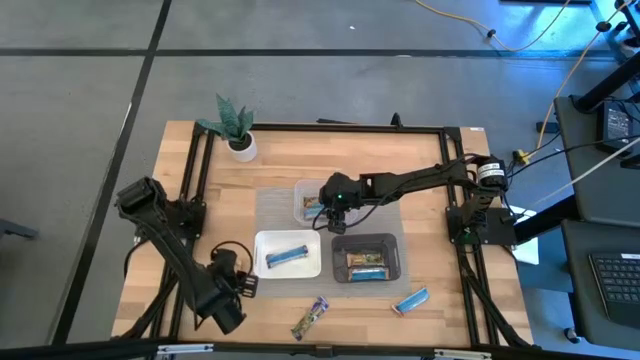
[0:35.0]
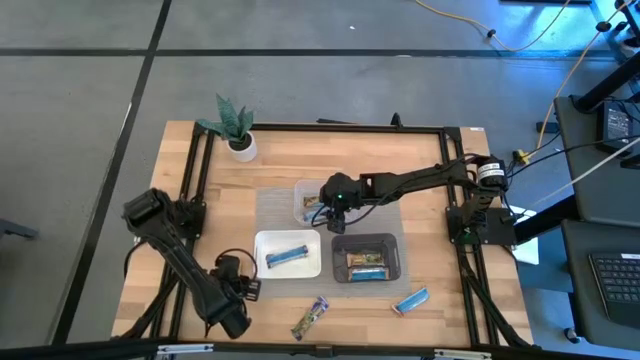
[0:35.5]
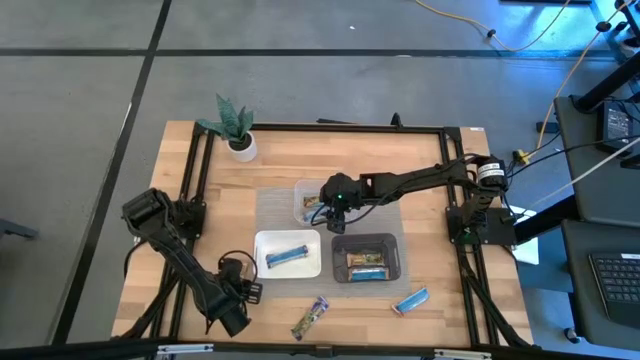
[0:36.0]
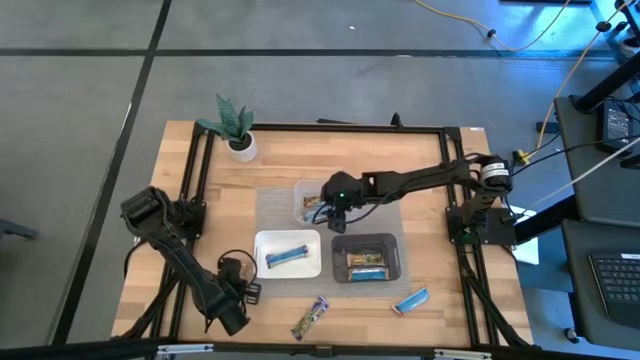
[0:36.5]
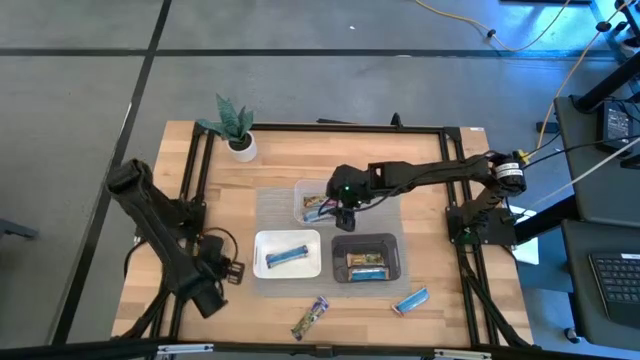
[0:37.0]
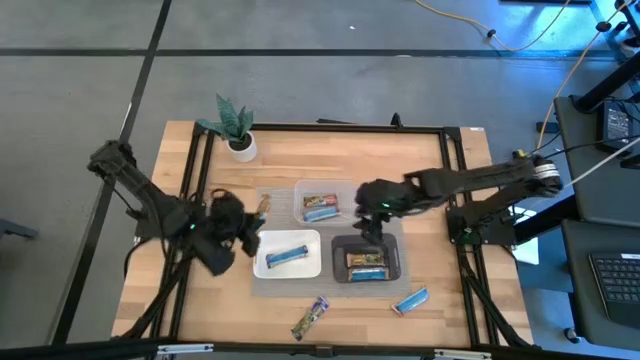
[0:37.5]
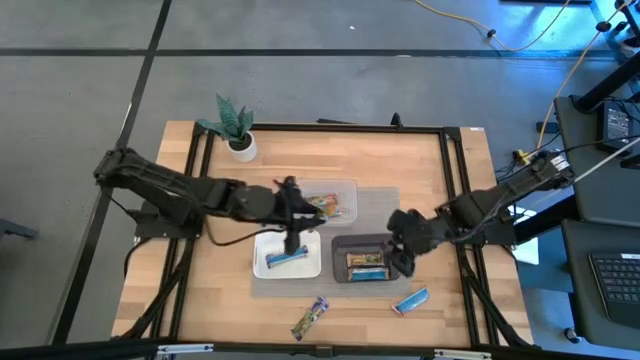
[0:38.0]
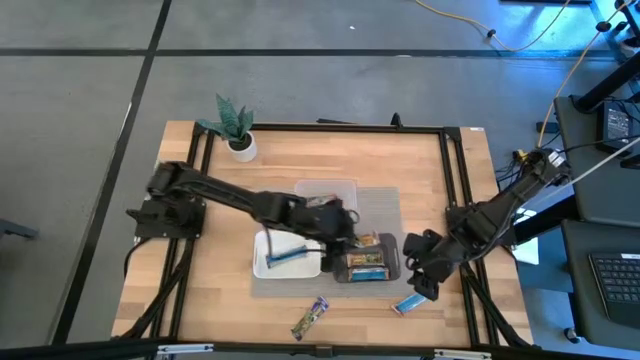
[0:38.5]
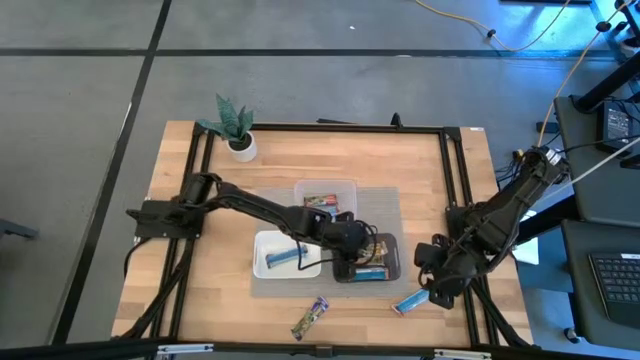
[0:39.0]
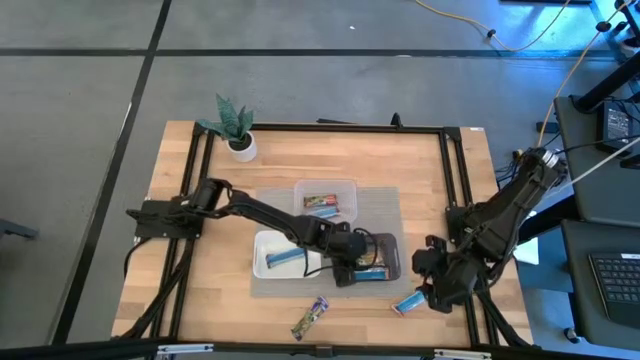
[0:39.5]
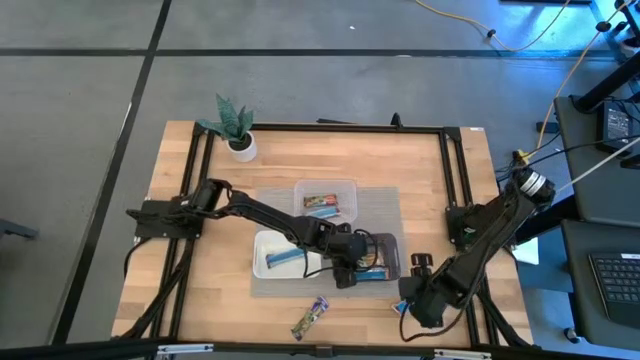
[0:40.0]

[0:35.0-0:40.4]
Task: Pick and place Granola Bars by type
Put the yellow granola bar into the transparent black bin

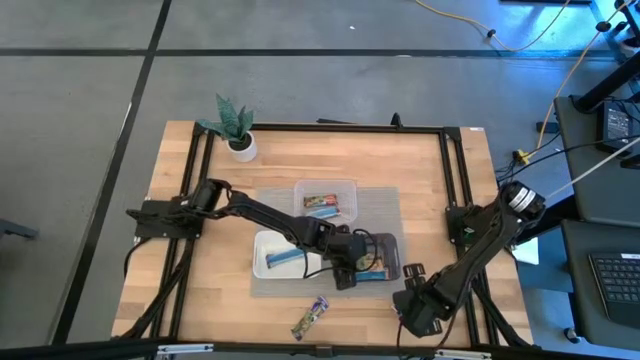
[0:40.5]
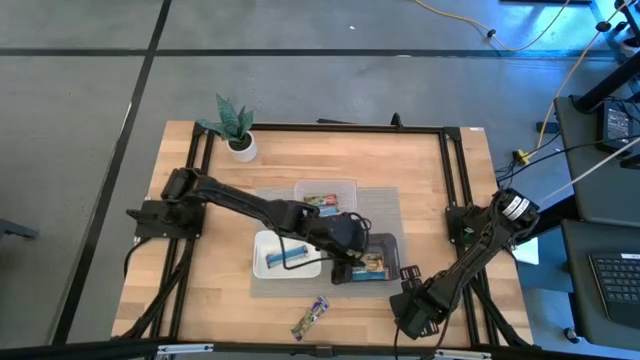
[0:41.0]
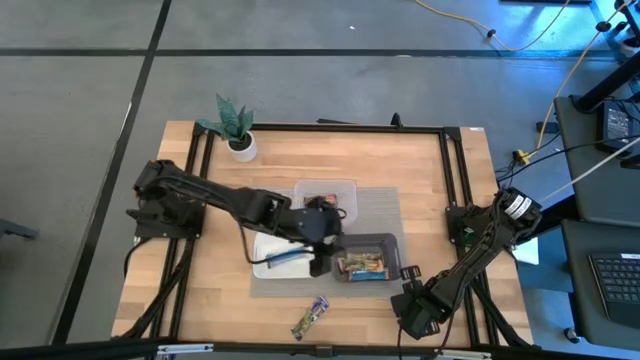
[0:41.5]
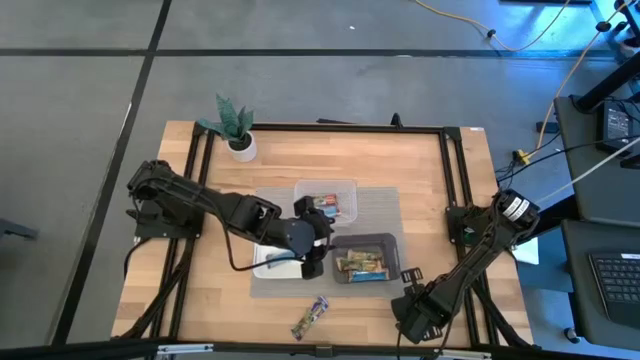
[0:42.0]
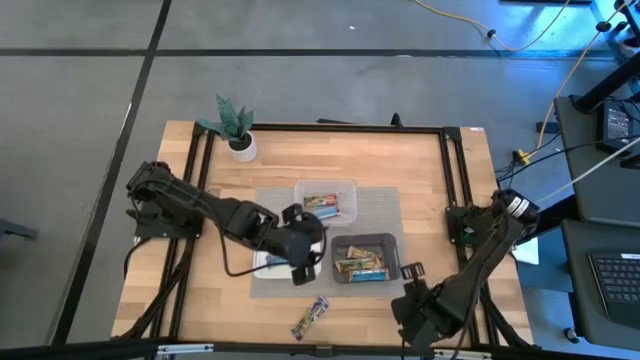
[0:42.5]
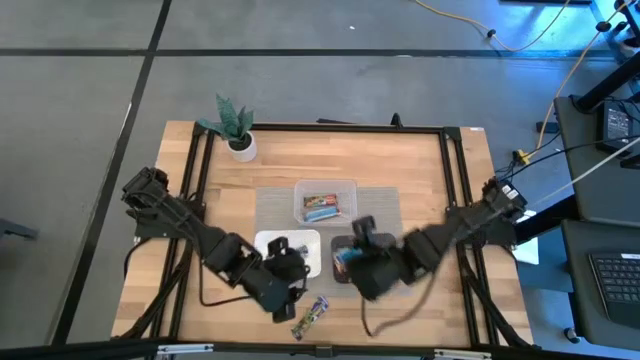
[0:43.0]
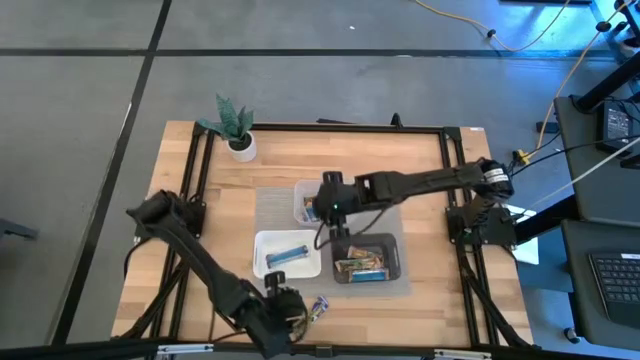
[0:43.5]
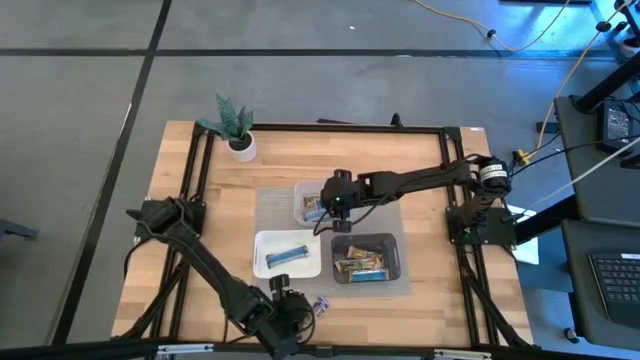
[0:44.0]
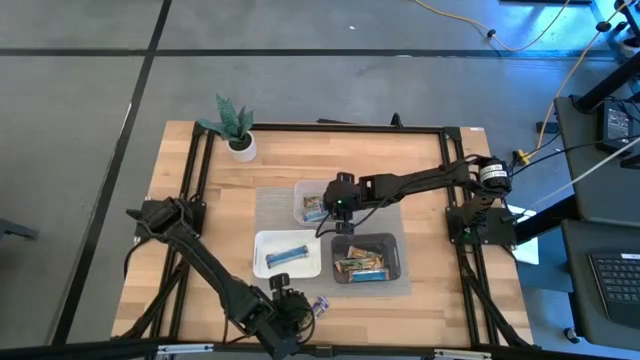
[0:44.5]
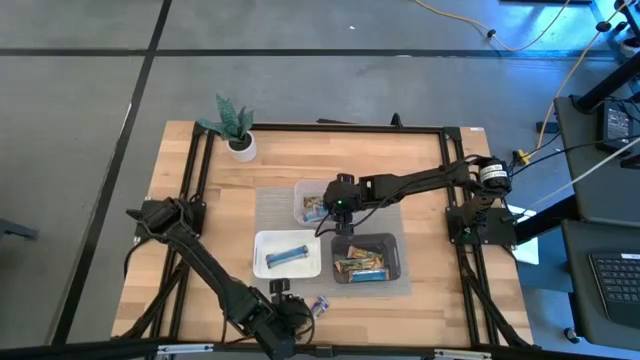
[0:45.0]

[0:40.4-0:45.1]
Put the red granola bar into the transparent bin

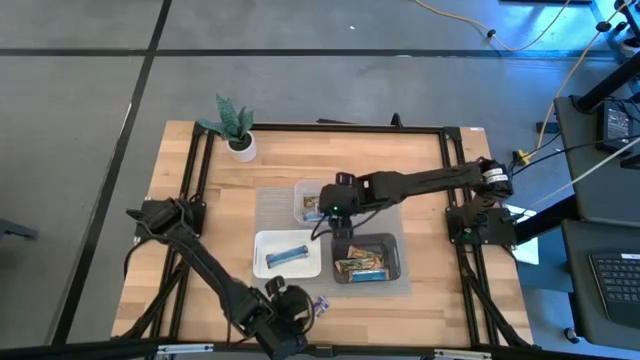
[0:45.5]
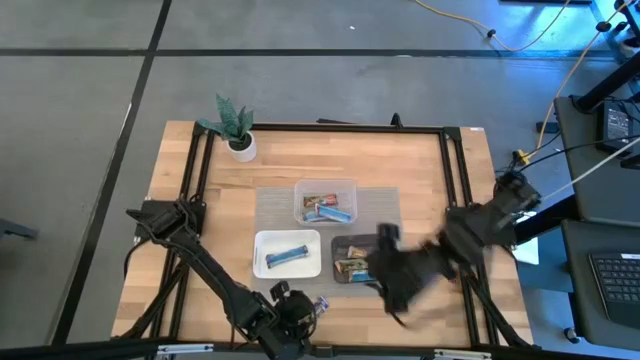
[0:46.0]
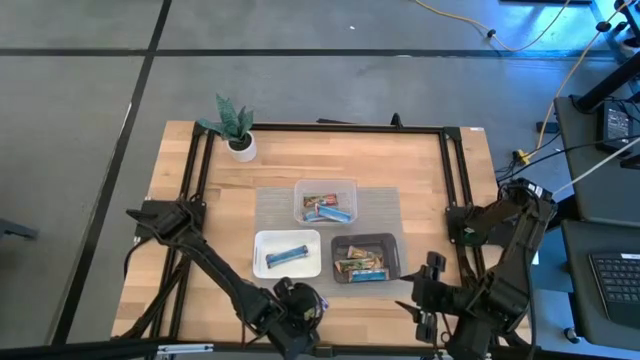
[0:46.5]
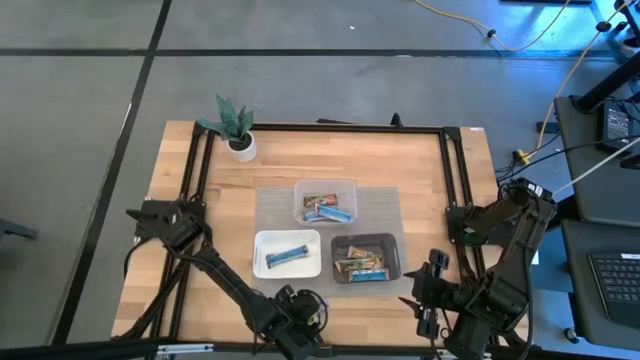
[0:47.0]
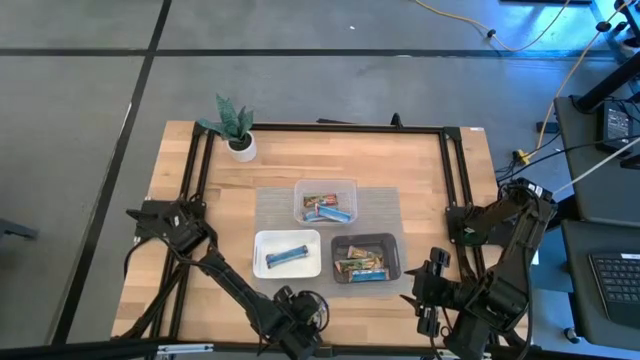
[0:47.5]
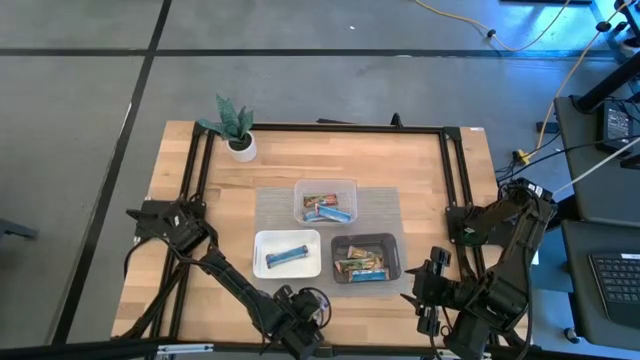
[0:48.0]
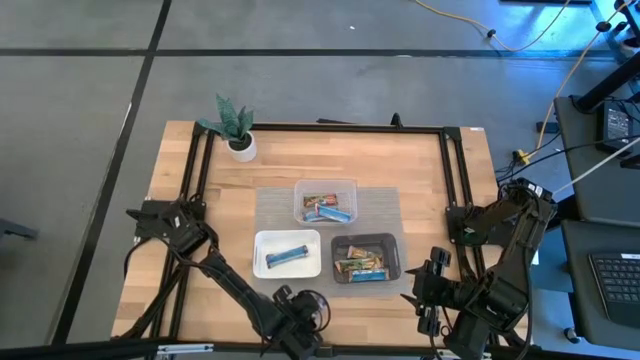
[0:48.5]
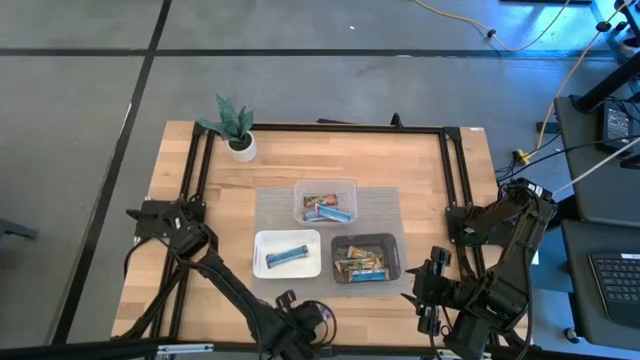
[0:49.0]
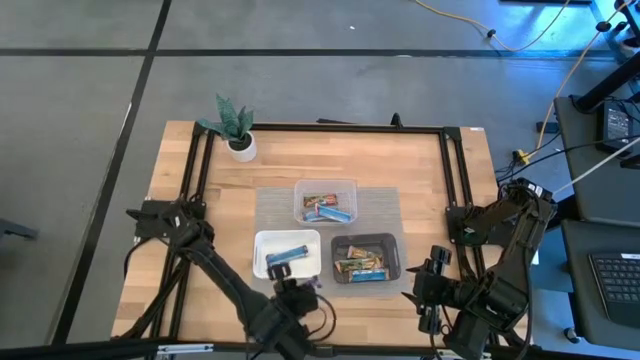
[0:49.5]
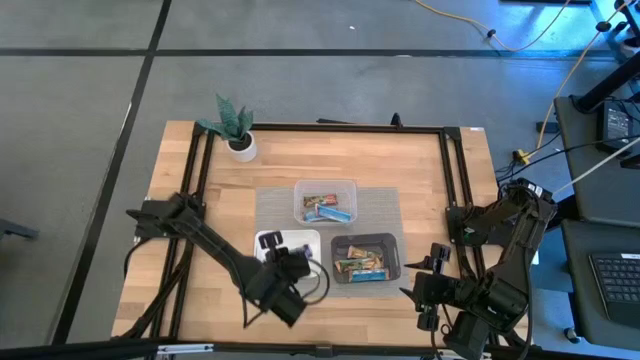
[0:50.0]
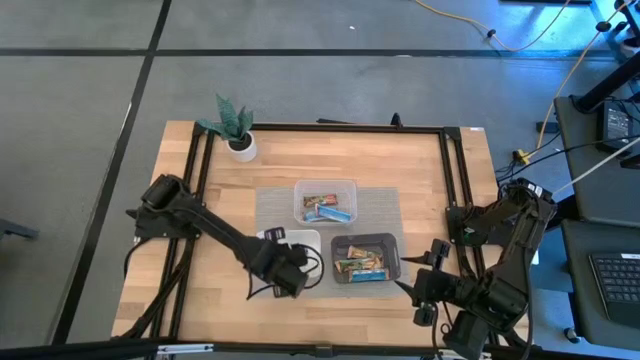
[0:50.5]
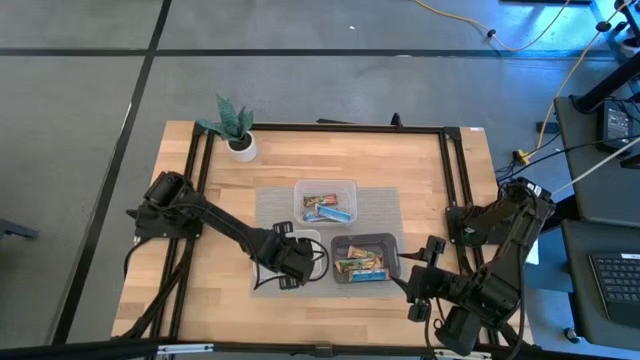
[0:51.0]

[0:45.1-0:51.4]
Put the blue granola bar into the white bin

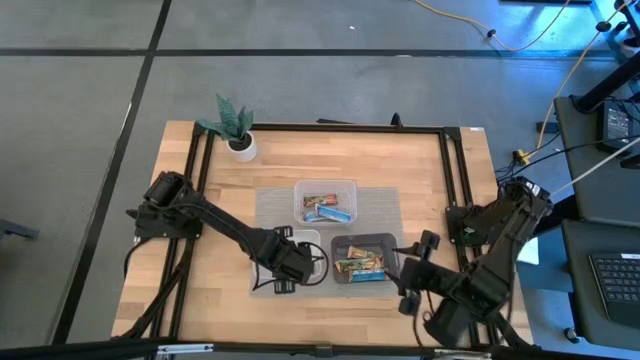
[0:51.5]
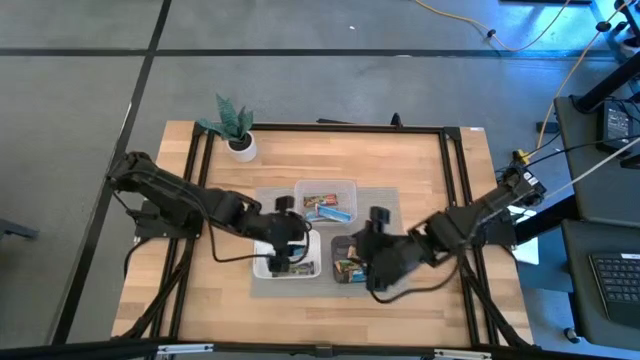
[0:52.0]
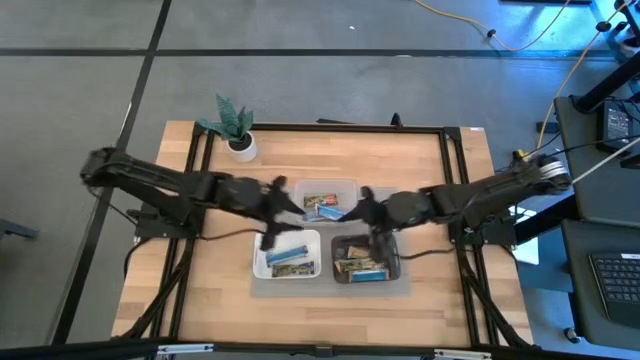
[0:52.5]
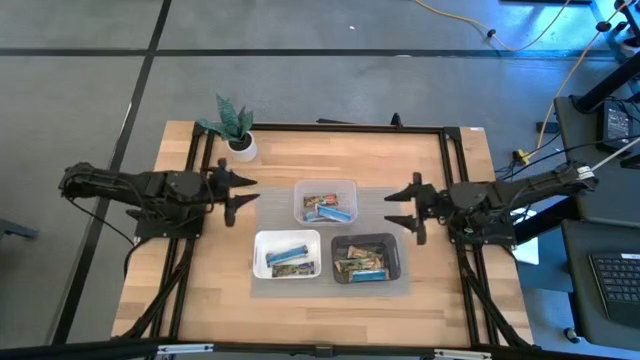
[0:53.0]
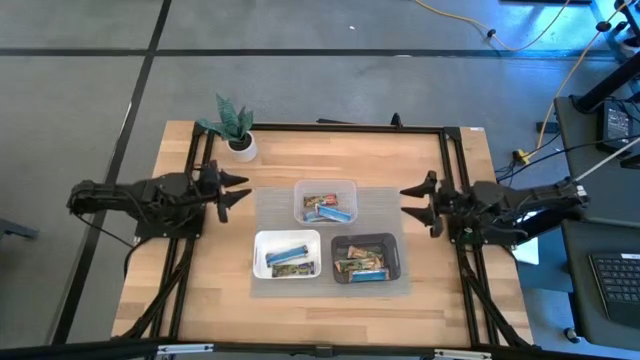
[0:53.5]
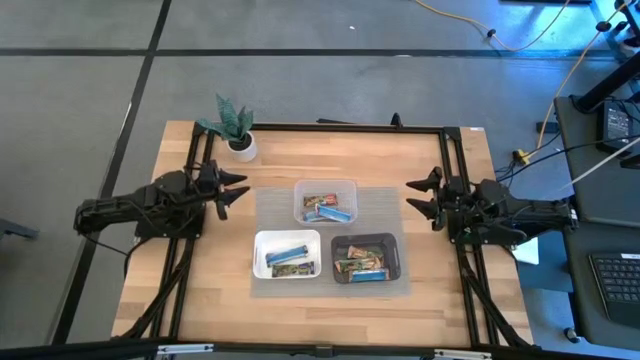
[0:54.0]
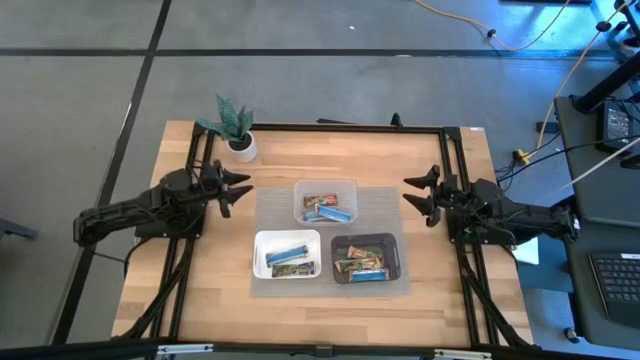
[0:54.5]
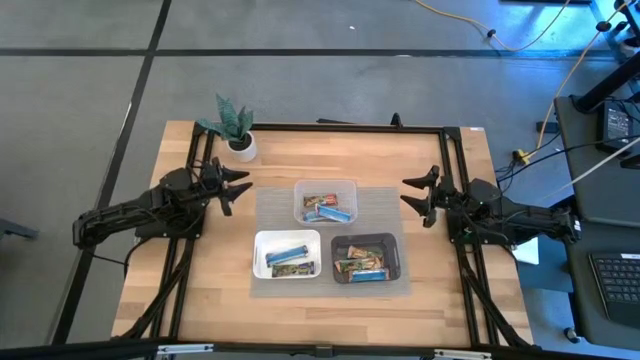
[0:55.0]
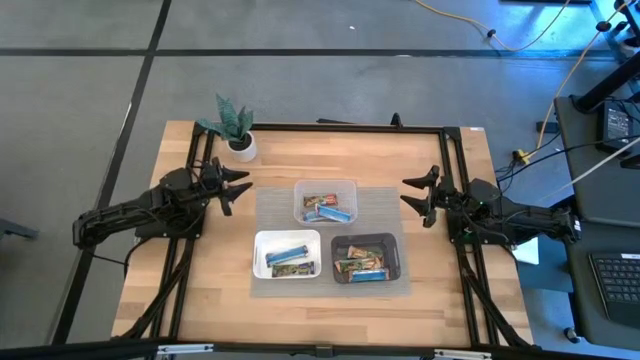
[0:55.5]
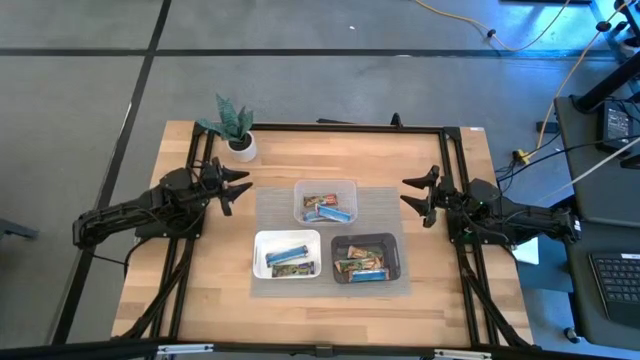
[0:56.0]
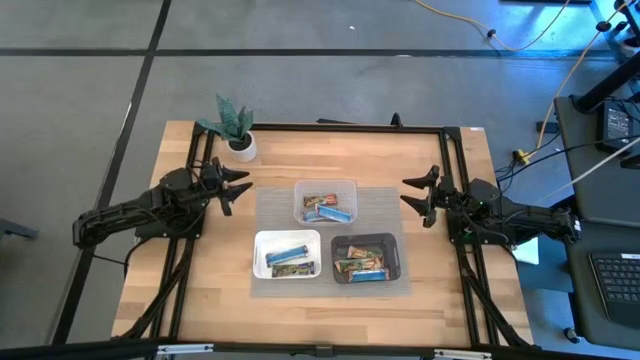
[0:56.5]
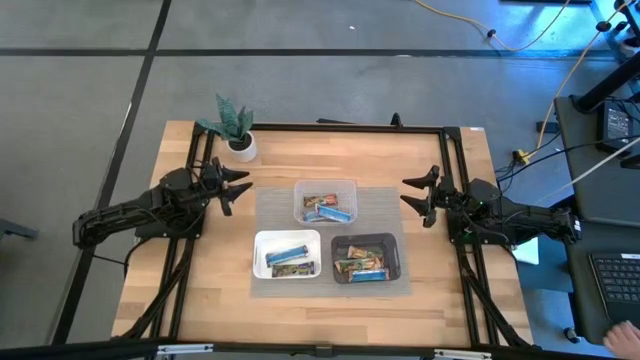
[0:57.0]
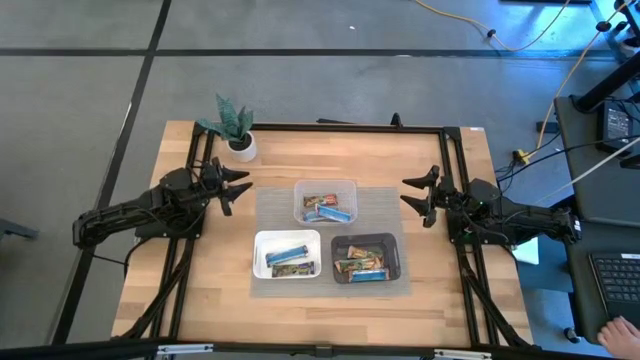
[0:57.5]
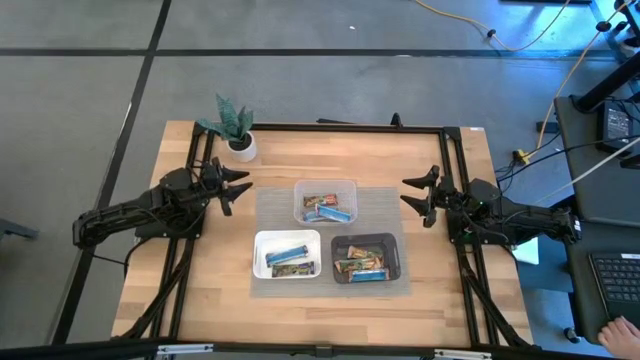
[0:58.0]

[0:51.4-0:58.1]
Return to Home Position
